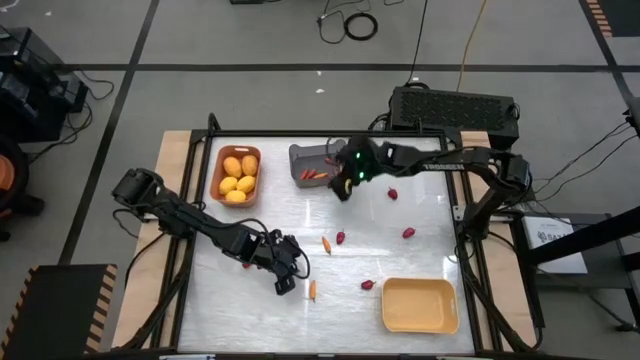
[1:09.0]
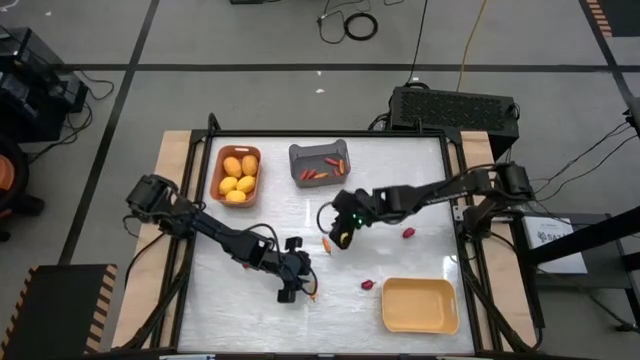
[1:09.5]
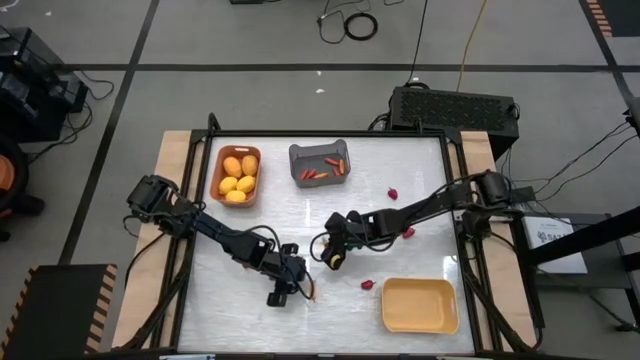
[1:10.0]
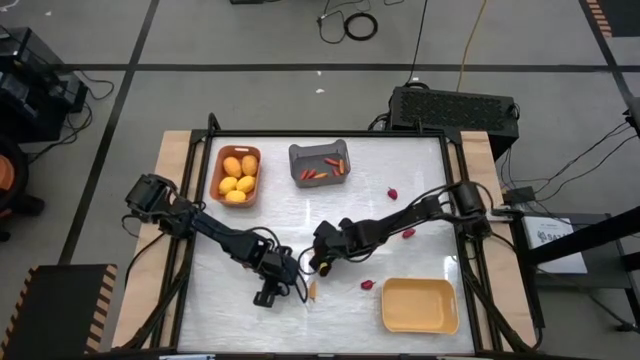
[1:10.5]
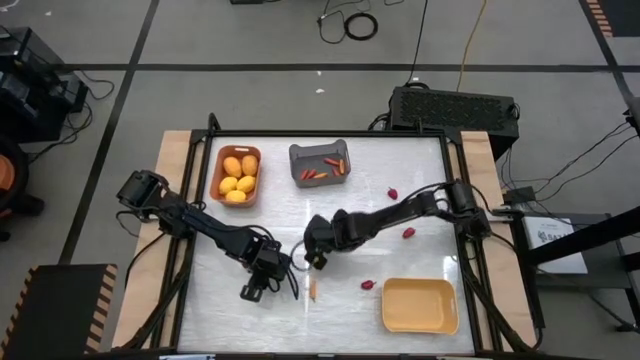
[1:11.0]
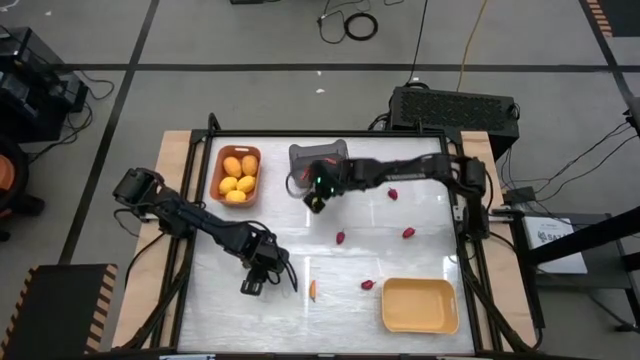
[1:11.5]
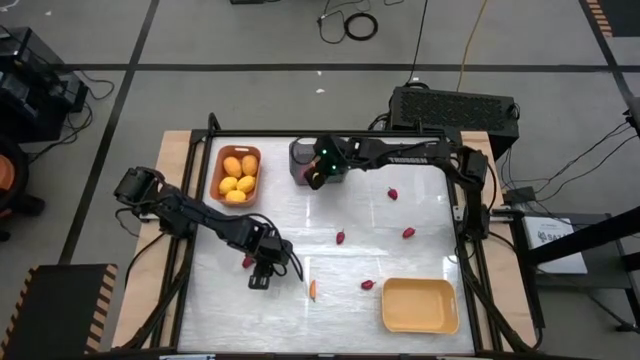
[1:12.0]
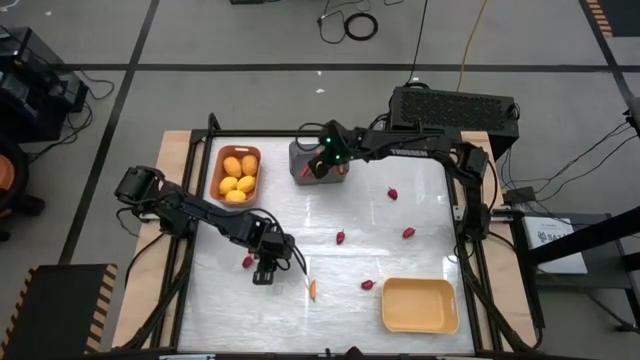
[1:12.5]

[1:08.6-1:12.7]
Task: Sort produce into baskets
Put the yellow chili pepper into the black bin

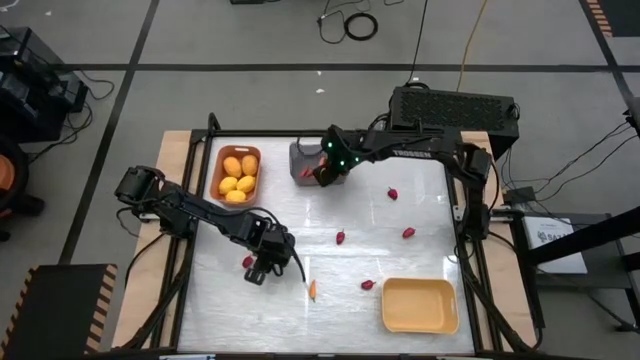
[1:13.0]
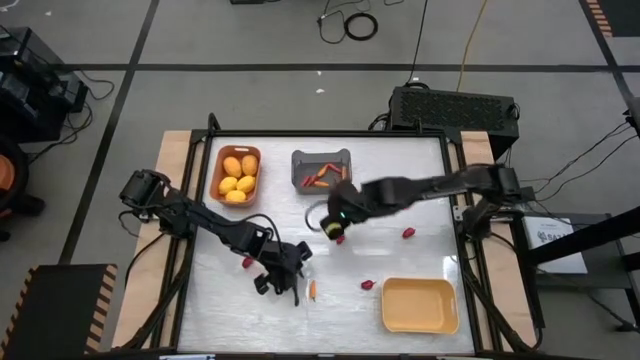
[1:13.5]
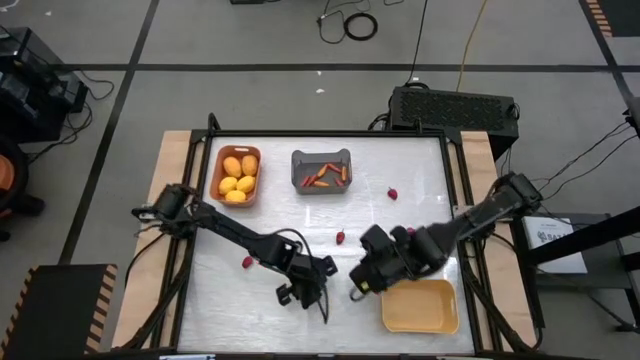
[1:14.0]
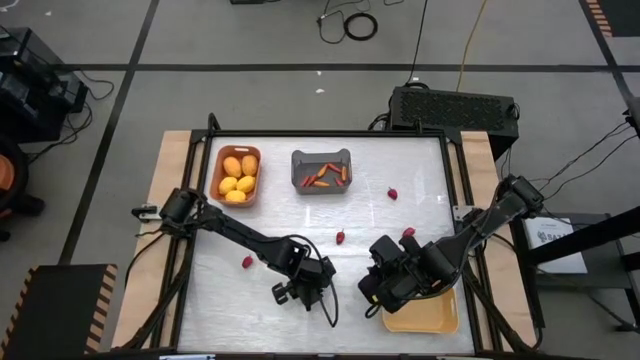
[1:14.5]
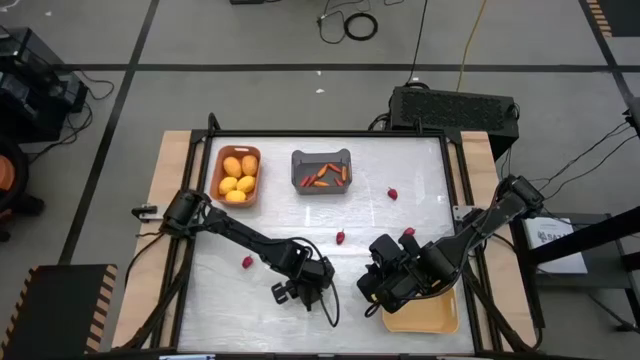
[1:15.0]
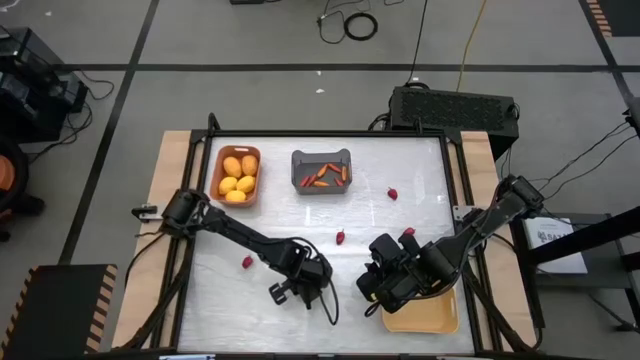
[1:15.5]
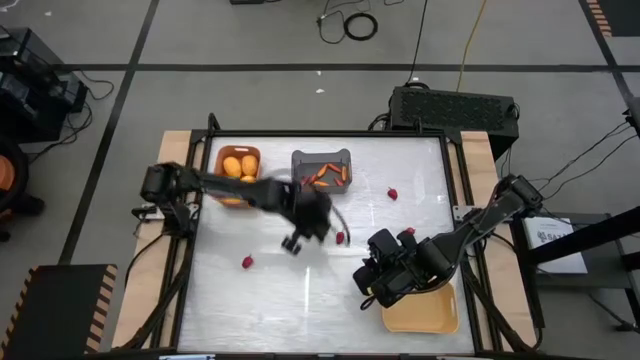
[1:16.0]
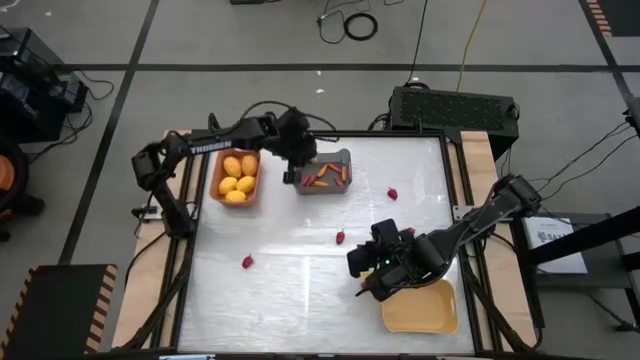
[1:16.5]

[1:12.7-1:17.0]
Put the yellow chili pepper into the black bin

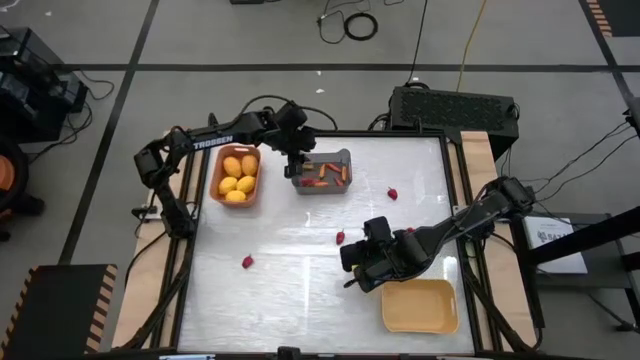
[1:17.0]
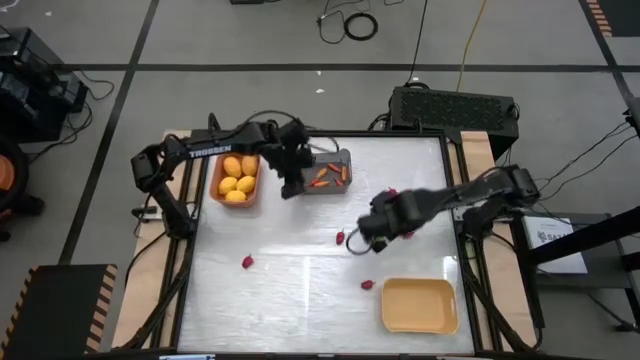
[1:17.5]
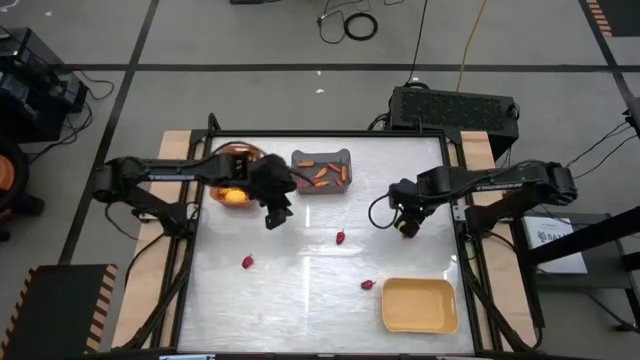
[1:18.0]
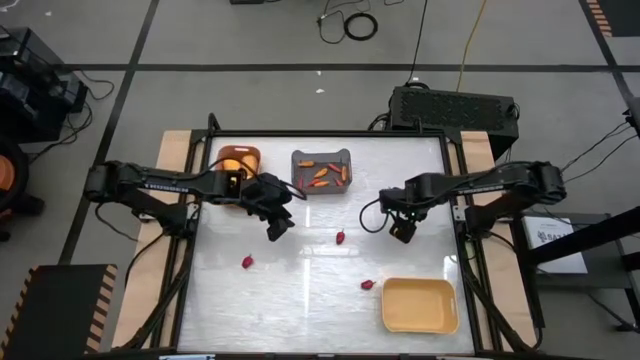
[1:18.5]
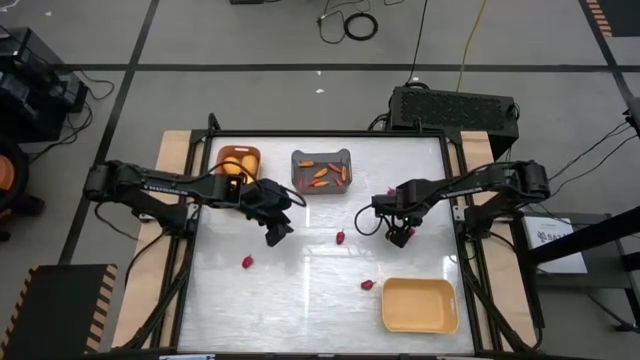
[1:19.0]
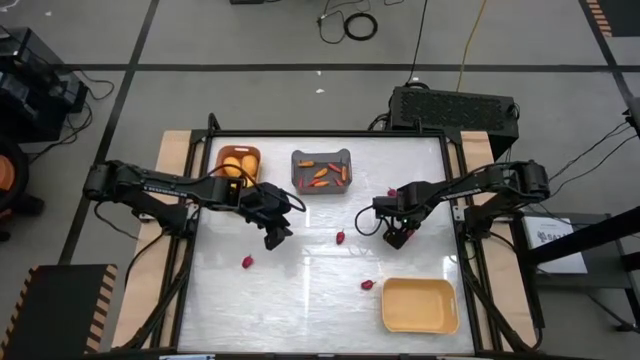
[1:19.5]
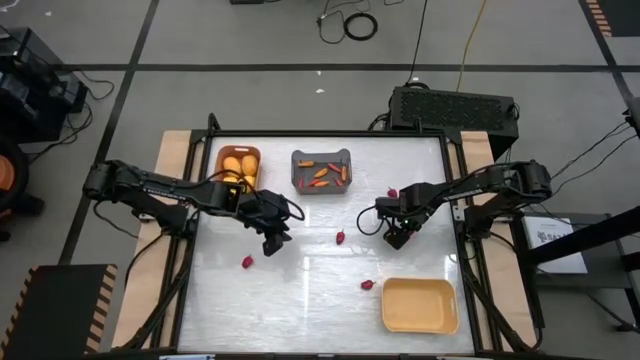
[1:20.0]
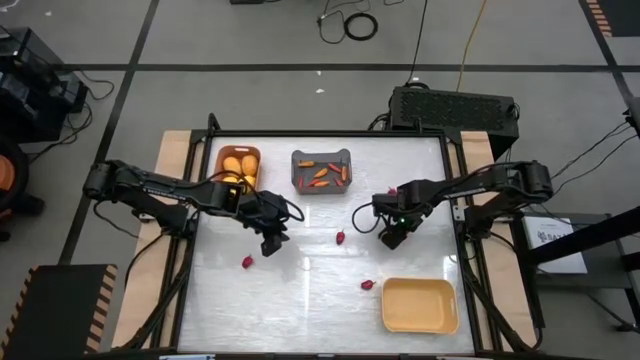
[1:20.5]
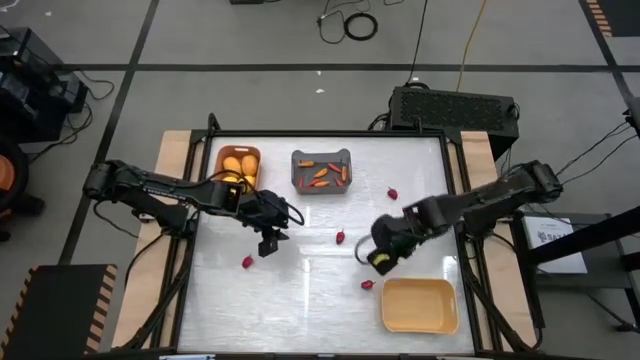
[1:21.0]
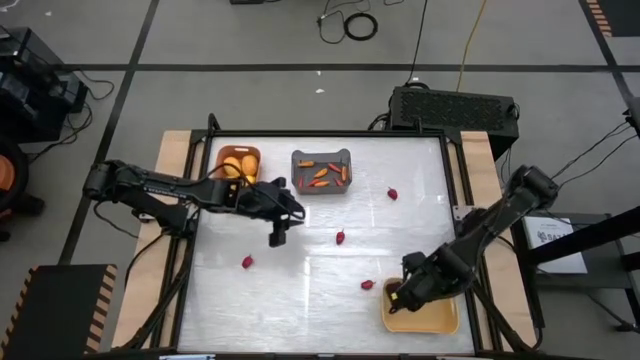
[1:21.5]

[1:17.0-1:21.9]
Put the red chili pepper into the yellow bin

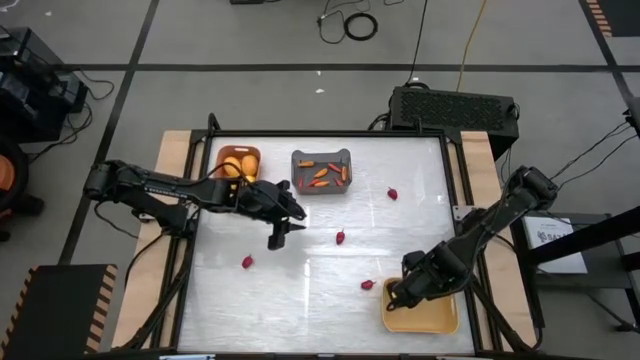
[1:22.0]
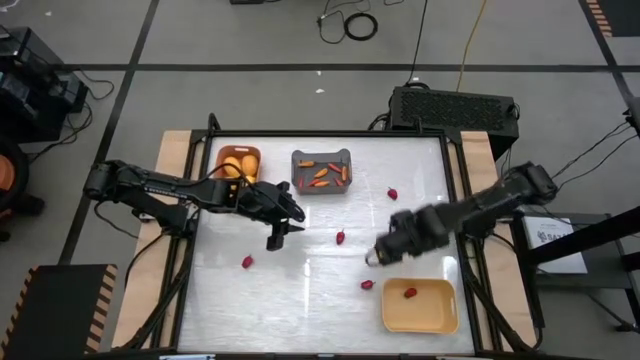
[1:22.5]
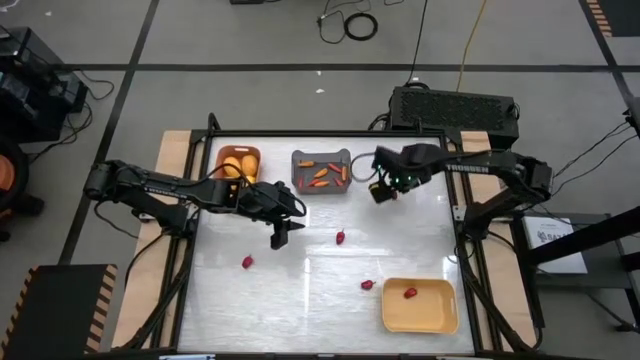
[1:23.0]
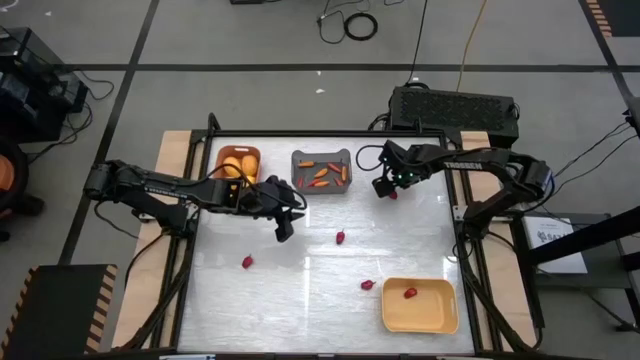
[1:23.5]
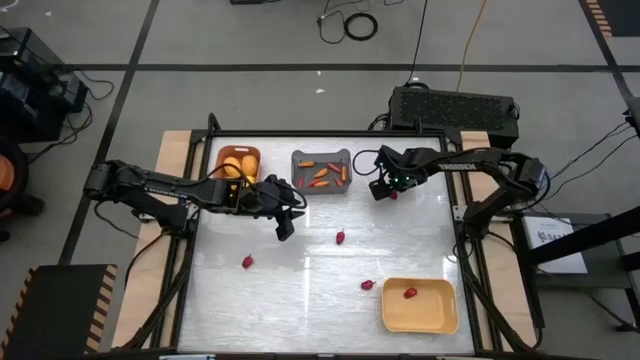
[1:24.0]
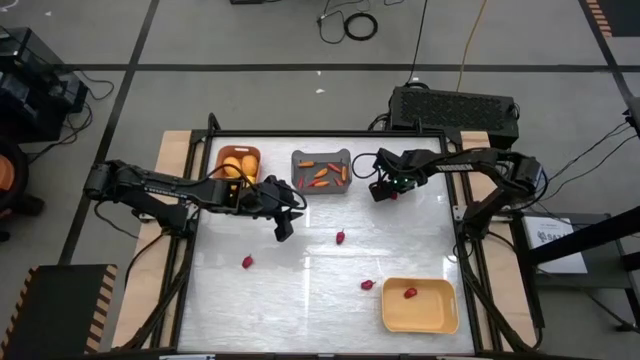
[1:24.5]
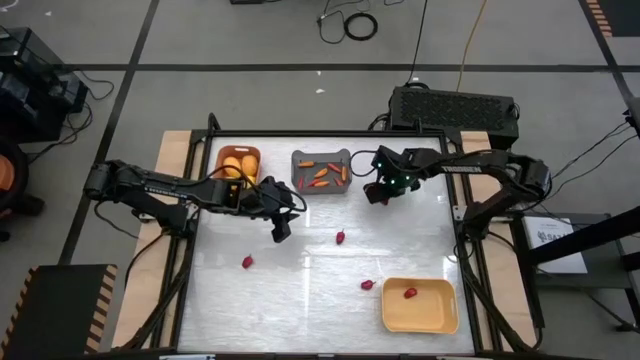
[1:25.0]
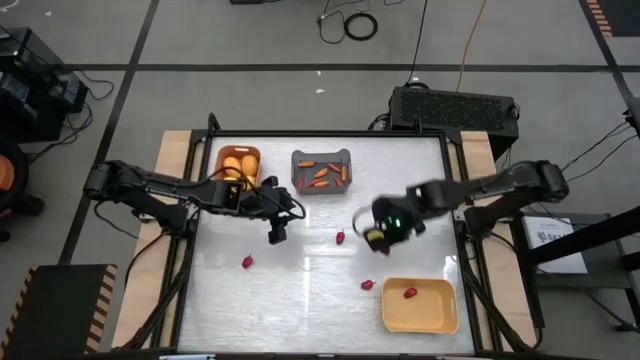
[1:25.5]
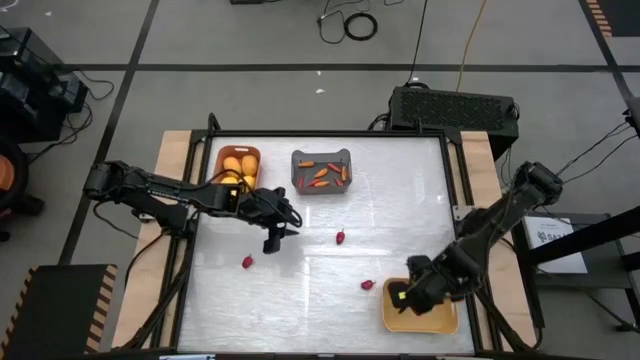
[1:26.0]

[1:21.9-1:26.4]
Put the red chili pepper into the yellow bin

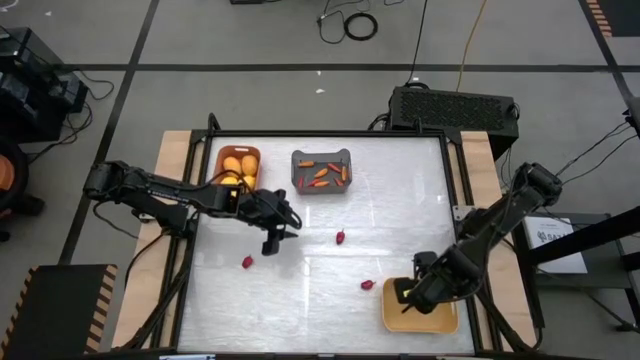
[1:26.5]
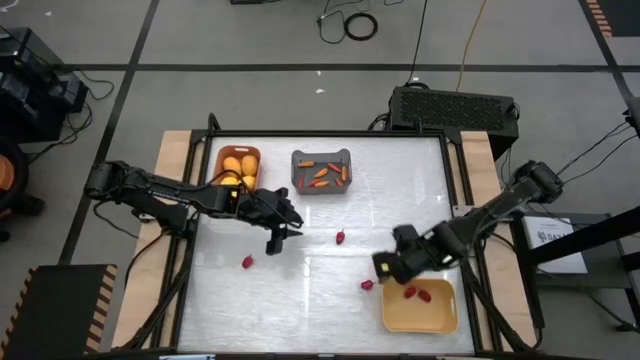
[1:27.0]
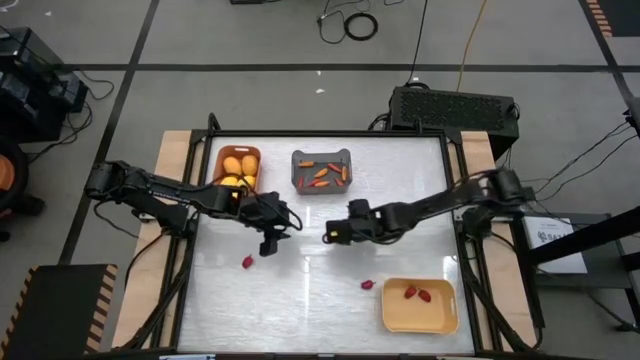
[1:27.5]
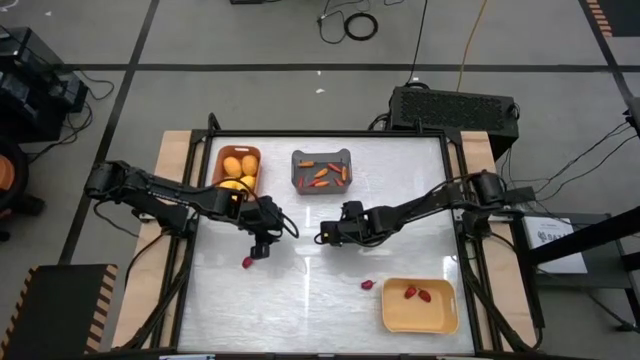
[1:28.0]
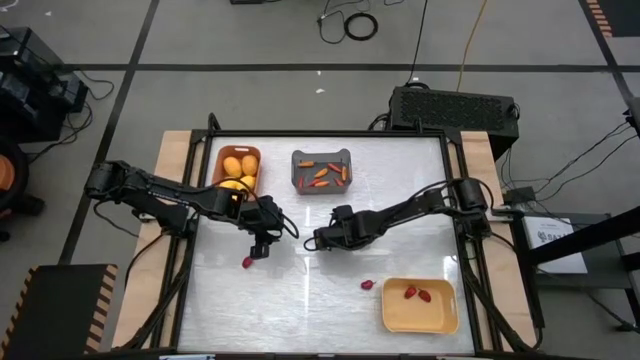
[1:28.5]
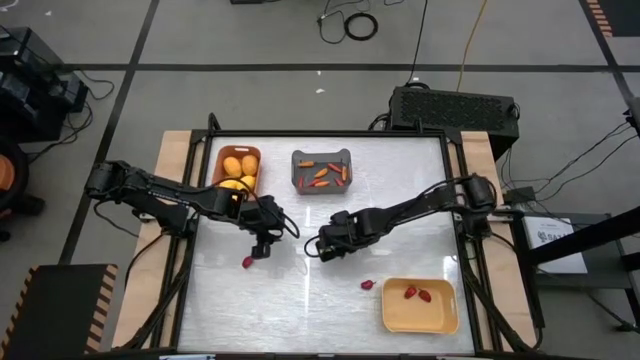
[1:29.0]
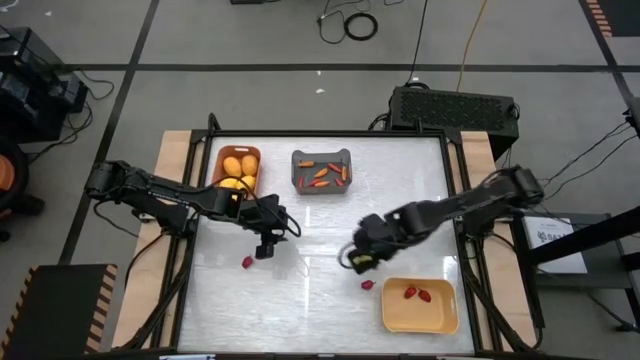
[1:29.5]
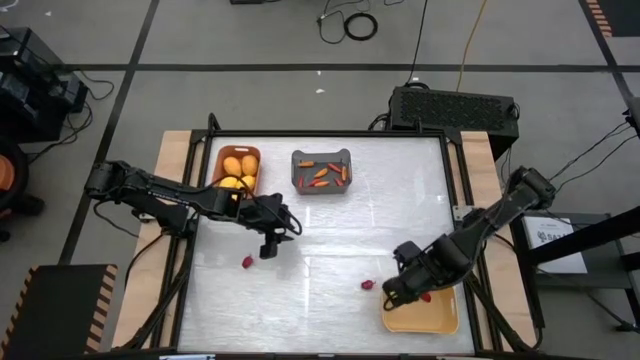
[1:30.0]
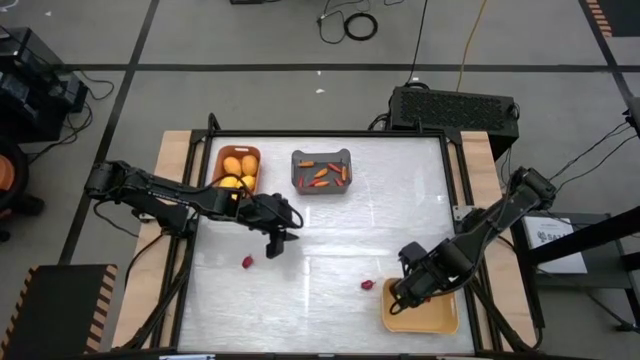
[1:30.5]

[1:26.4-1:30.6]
Put the red chili pepper into the yellow bin
